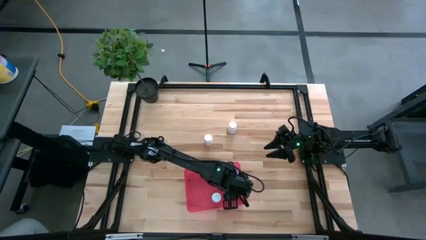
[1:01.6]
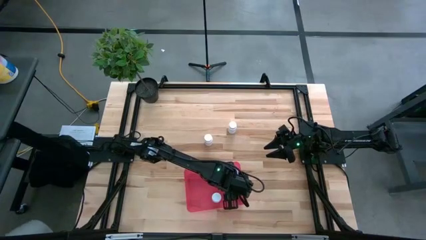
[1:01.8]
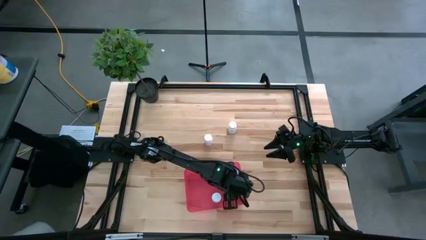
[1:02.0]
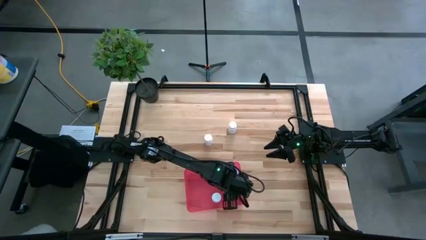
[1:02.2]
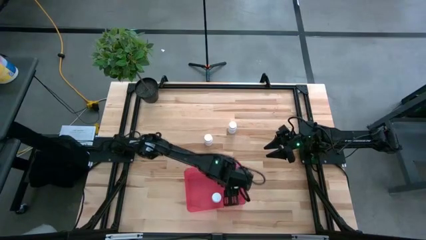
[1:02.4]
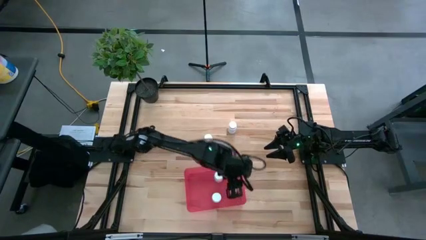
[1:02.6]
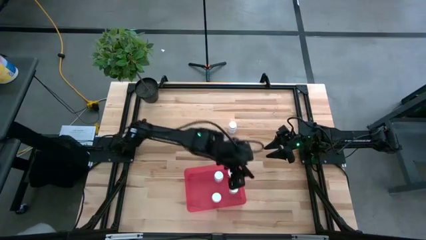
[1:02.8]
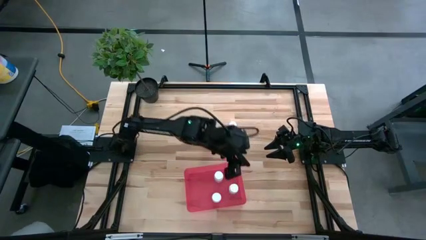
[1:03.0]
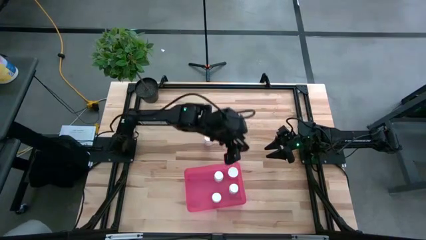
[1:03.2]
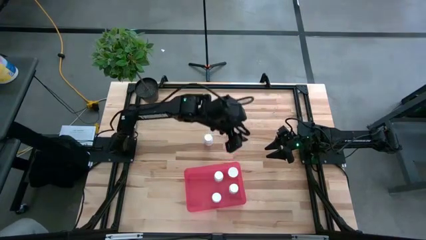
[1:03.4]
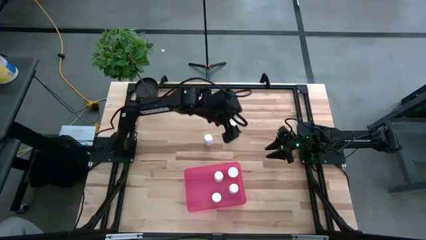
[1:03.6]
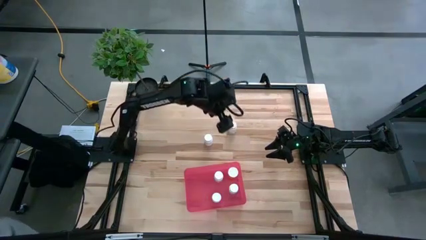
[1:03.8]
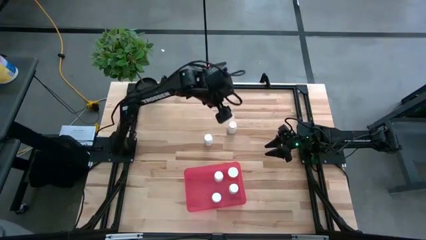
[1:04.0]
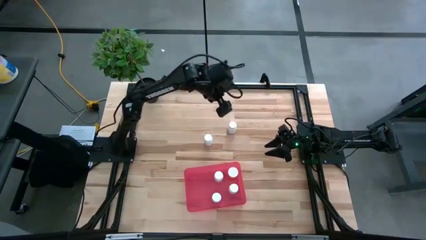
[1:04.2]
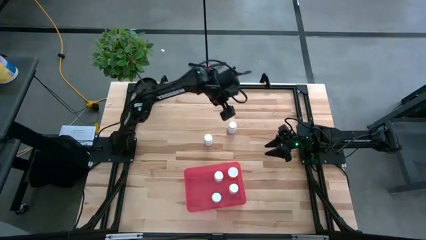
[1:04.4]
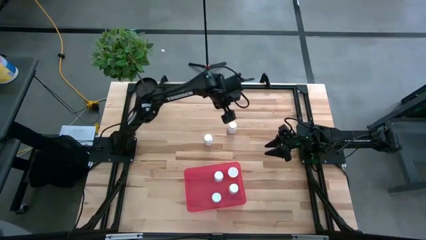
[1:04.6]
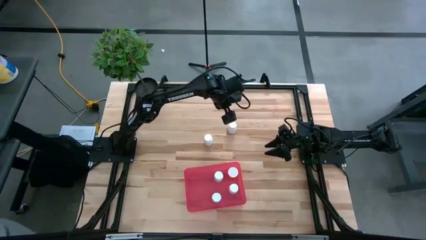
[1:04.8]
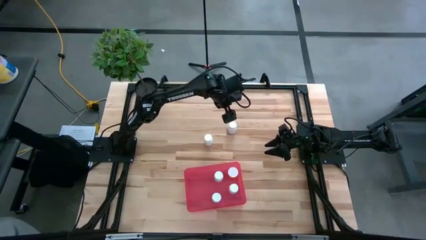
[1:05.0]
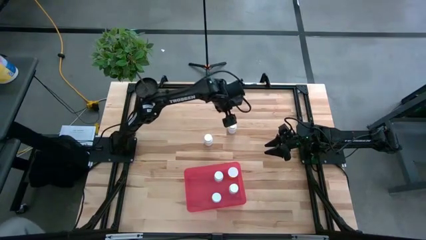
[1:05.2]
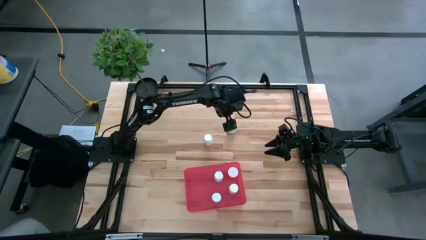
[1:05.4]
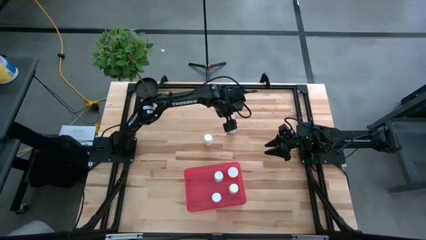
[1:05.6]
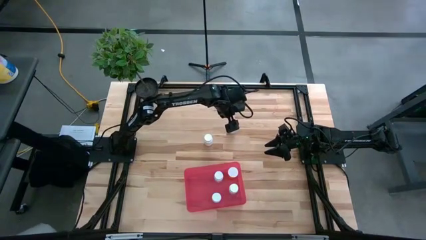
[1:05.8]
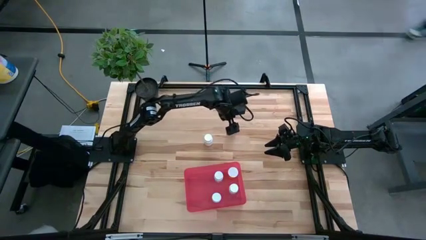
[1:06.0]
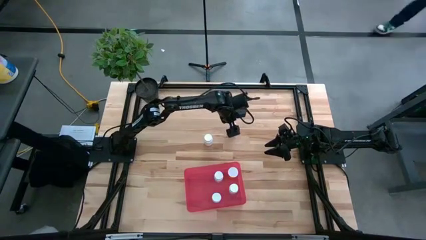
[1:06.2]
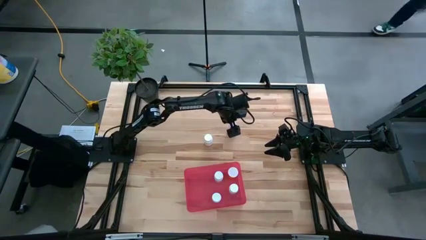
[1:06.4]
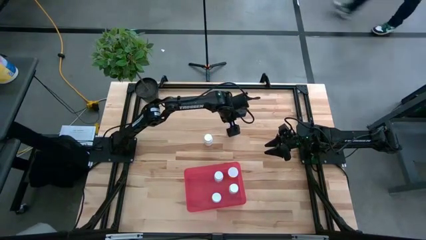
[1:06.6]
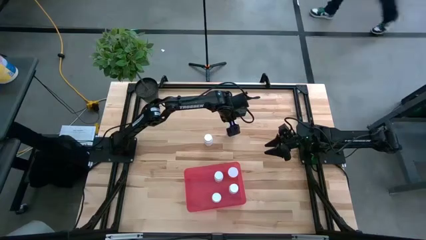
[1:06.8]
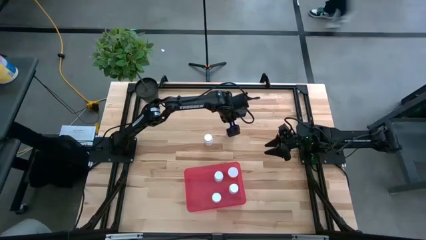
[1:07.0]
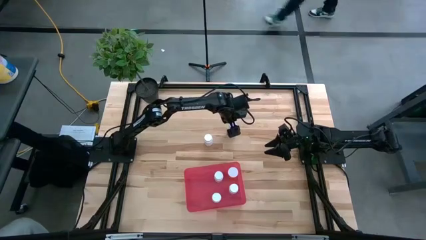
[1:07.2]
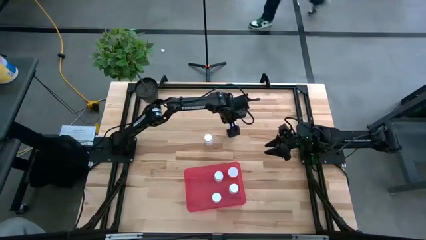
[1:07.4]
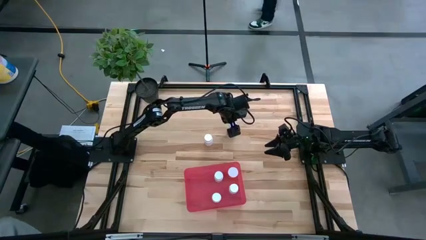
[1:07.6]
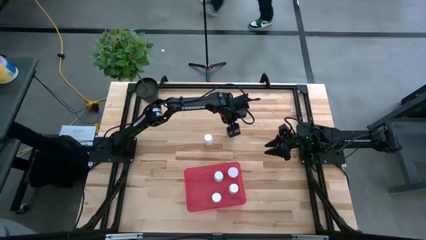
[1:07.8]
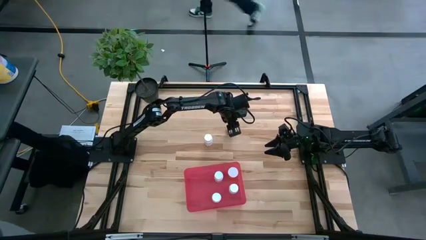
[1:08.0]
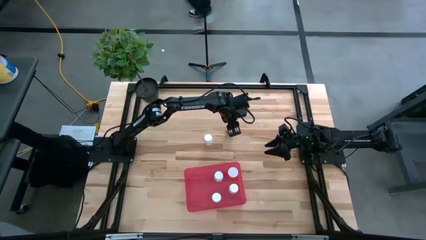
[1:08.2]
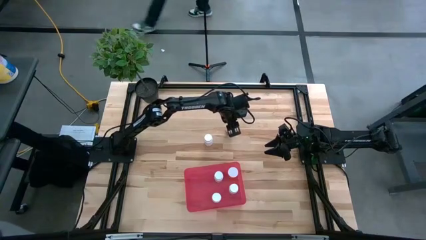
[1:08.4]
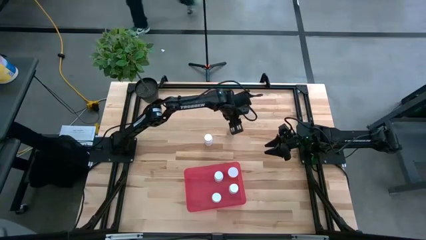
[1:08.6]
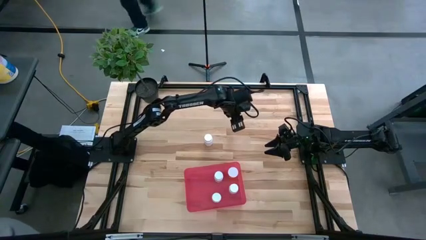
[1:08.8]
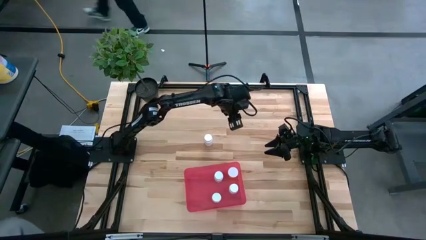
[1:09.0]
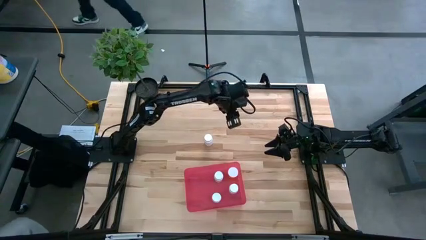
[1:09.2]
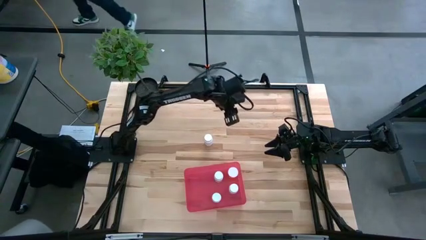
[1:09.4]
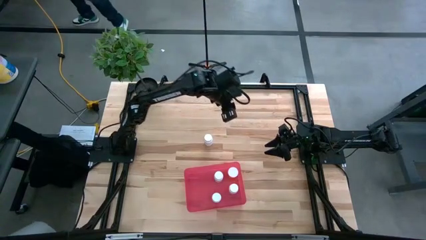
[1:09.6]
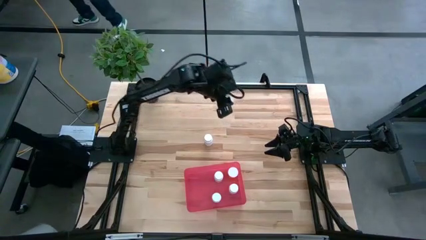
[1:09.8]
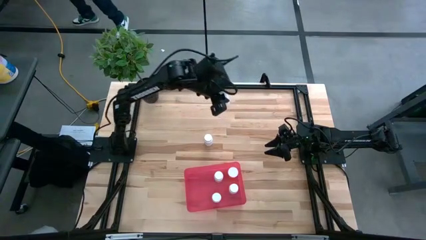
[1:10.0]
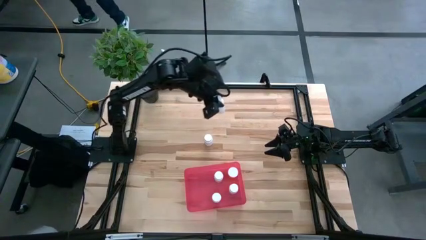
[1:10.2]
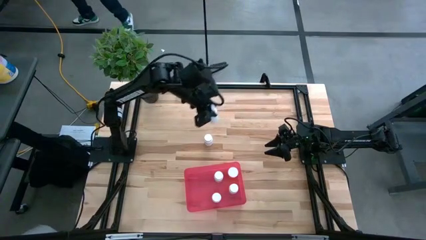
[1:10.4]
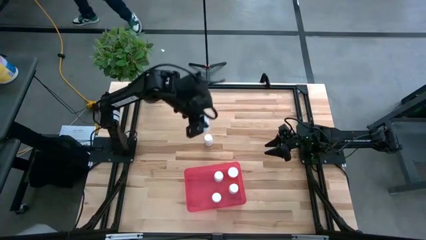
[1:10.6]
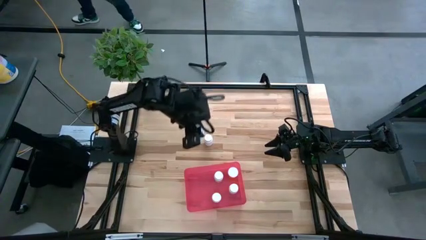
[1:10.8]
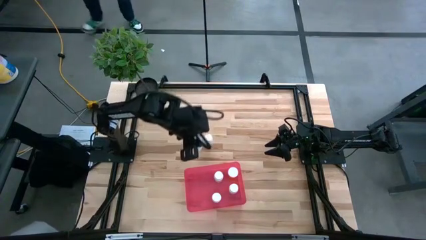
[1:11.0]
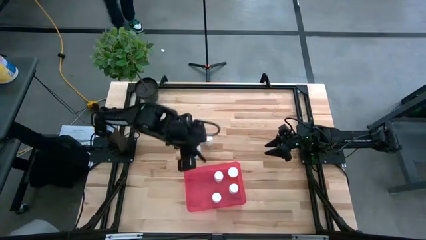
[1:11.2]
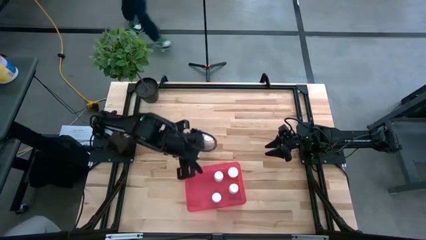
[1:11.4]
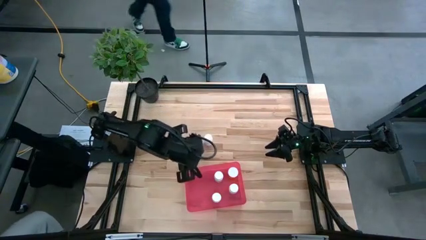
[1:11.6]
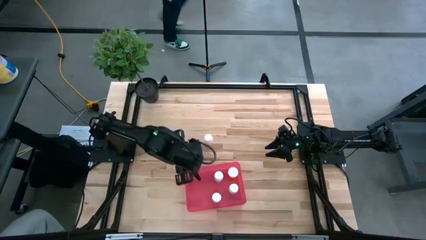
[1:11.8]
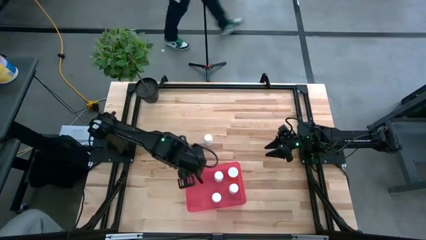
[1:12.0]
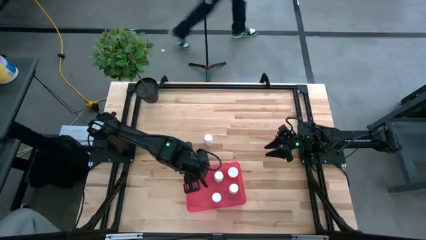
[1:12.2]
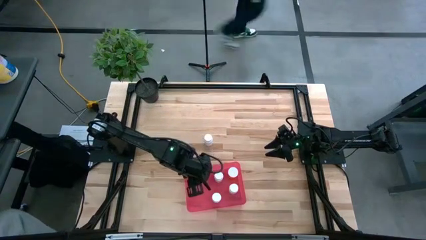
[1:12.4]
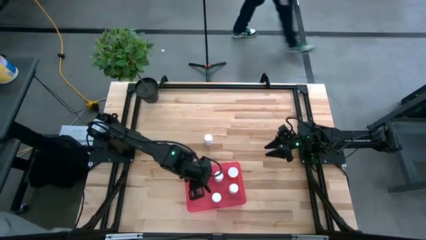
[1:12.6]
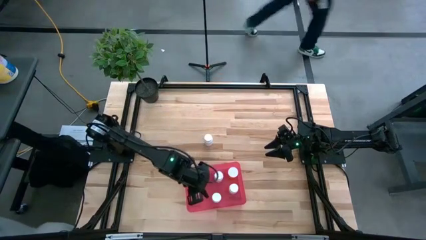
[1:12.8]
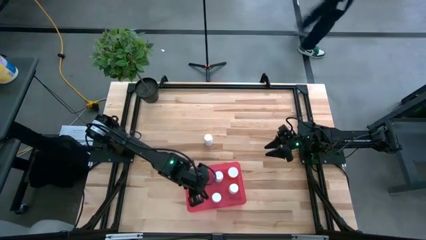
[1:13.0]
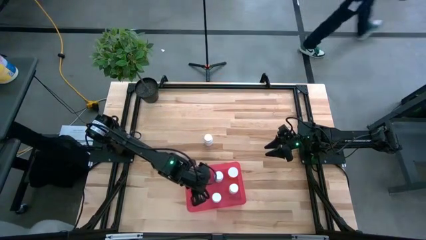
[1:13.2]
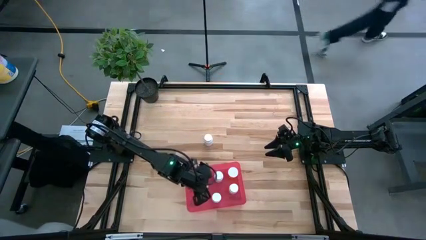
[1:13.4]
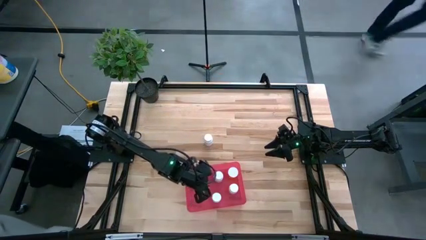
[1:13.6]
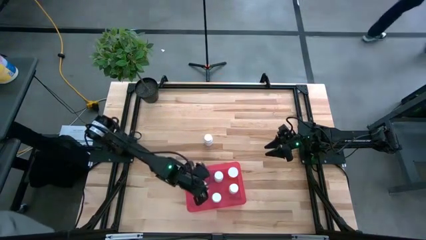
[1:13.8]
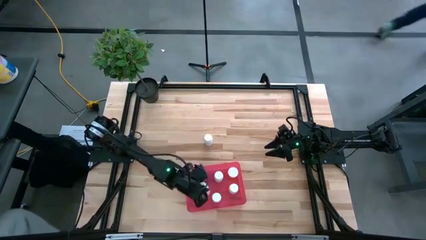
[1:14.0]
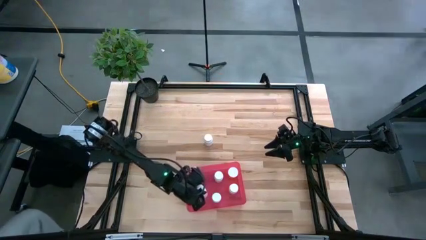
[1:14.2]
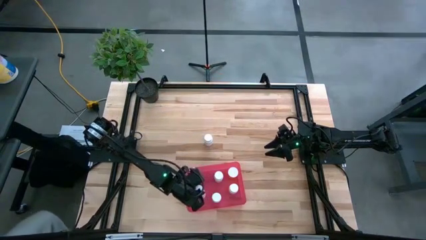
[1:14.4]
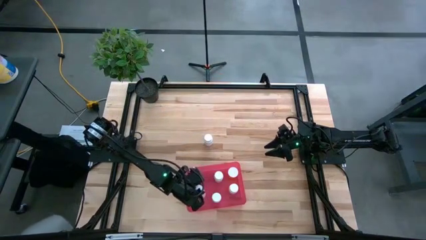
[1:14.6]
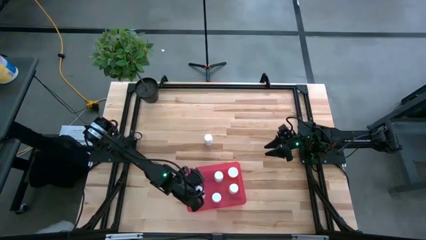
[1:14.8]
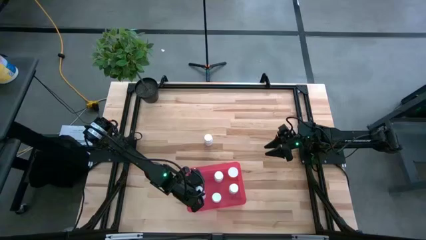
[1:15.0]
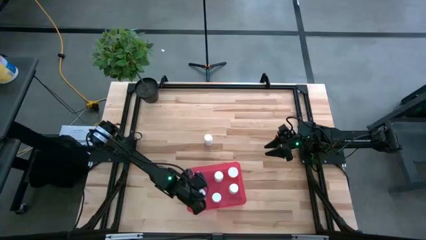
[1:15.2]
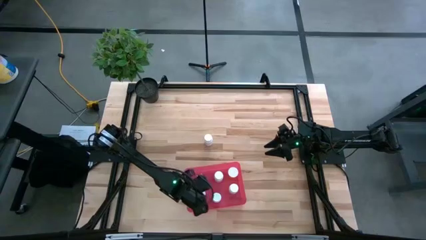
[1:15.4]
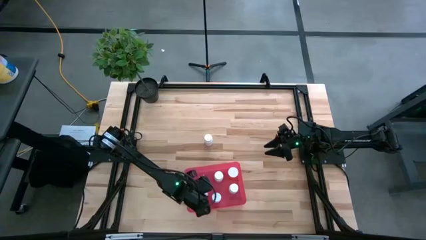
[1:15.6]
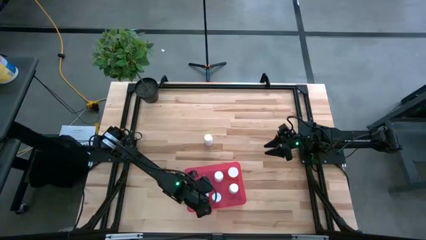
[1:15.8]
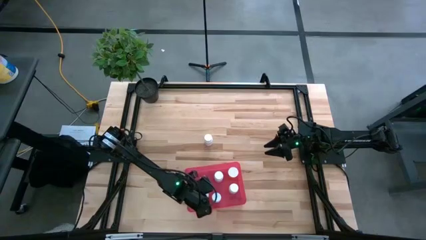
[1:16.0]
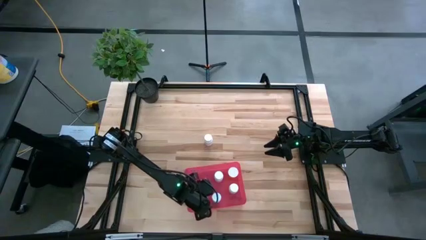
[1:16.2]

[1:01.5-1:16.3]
Task: Pick and place pill bottles into a basket
Put the white pill bottle into the red bin

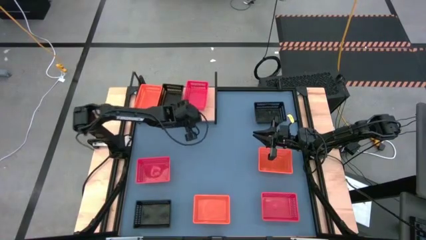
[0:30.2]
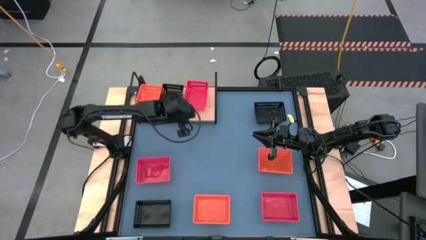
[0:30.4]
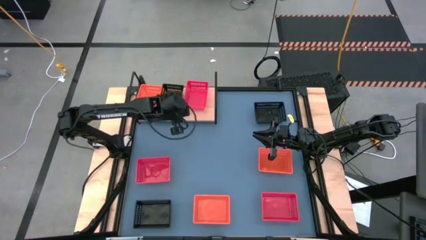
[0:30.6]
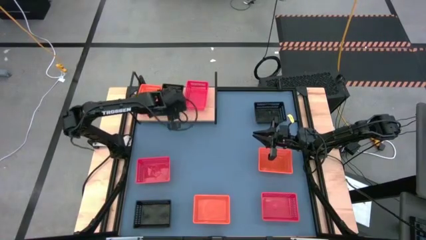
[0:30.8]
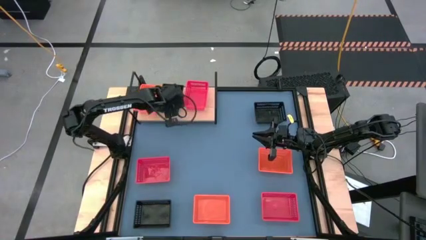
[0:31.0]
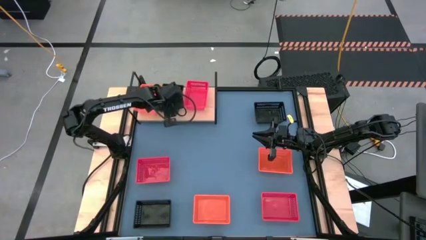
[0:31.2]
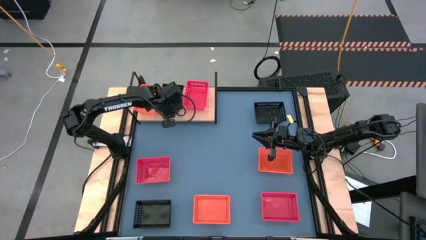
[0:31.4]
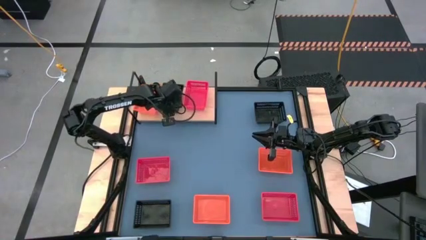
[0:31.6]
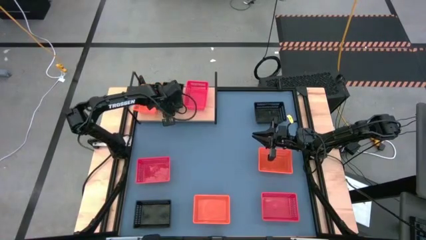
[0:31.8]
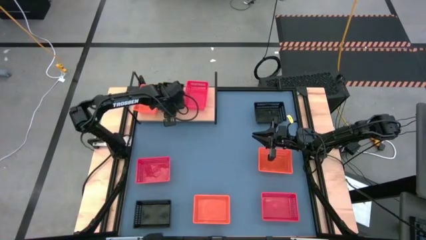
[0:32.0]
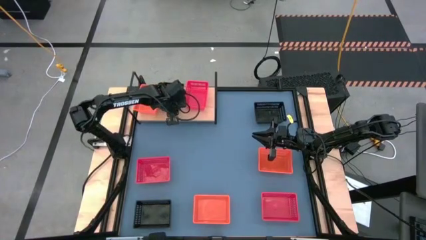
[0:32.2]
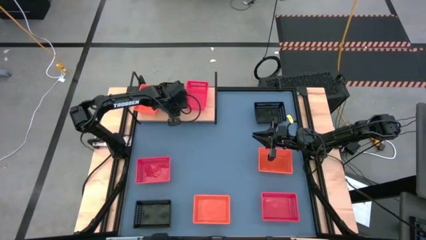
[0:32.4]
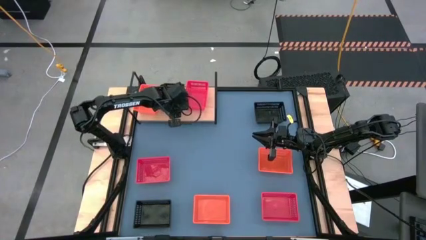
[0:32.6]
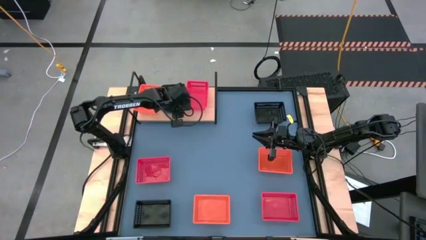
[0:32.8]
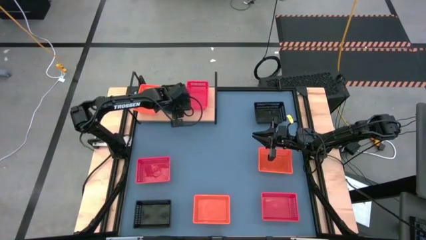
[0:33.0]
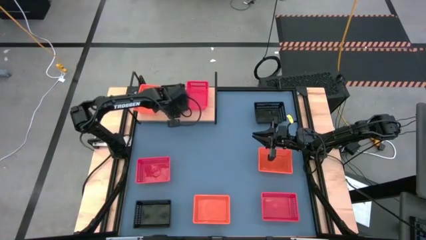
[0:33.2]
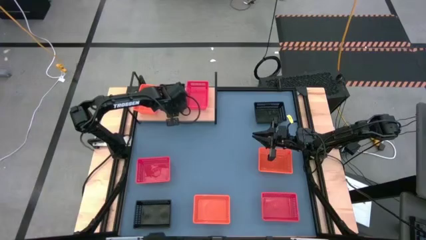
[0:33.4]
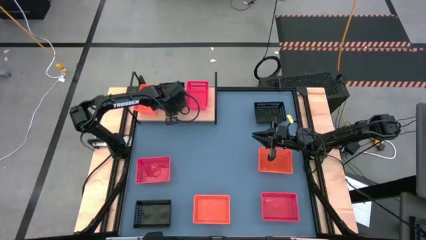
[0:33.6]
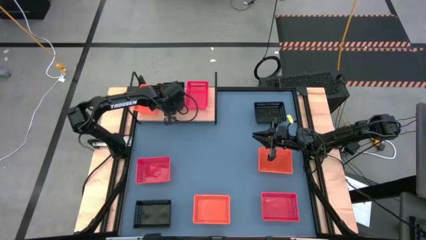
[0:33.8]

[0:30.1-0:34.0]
Task: Stack baskets on shelf by color
Adjust the black bin on the shelf
